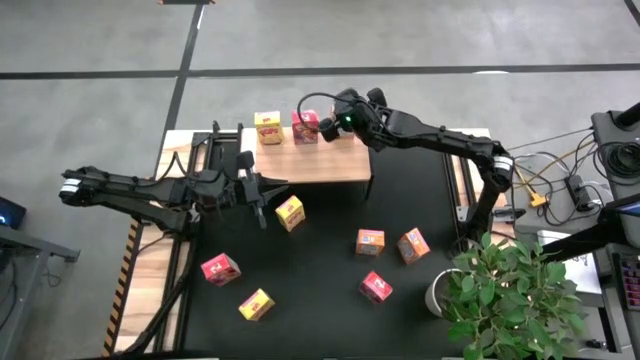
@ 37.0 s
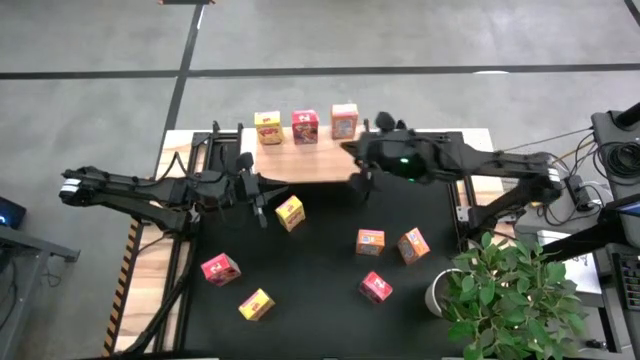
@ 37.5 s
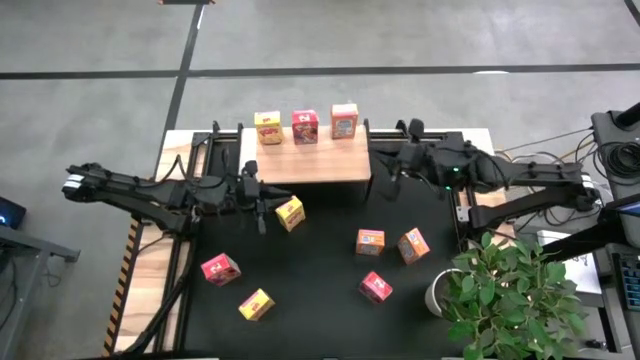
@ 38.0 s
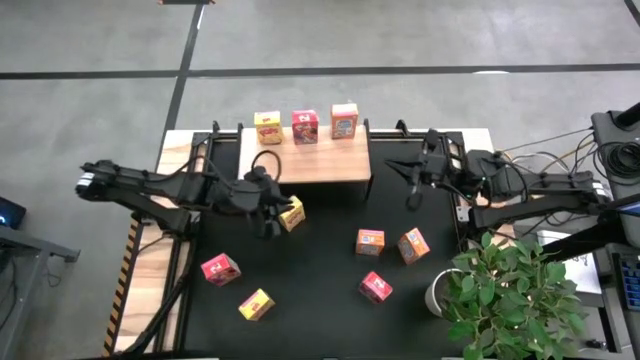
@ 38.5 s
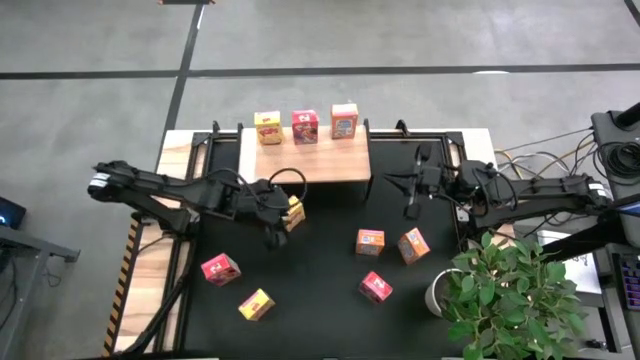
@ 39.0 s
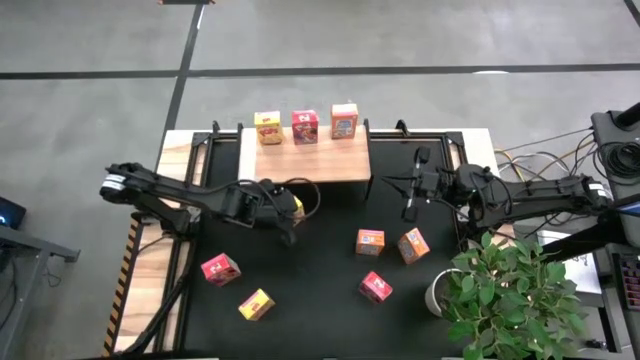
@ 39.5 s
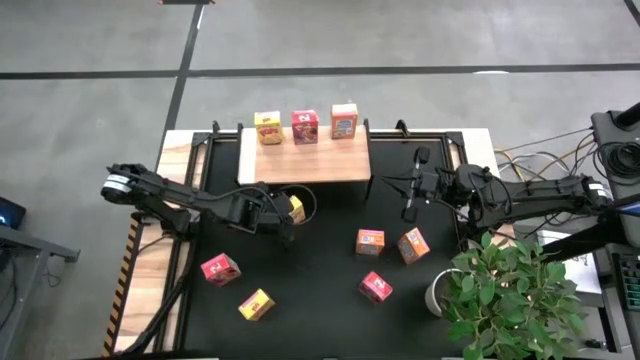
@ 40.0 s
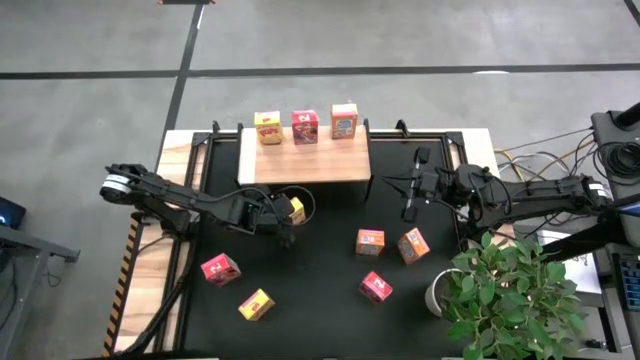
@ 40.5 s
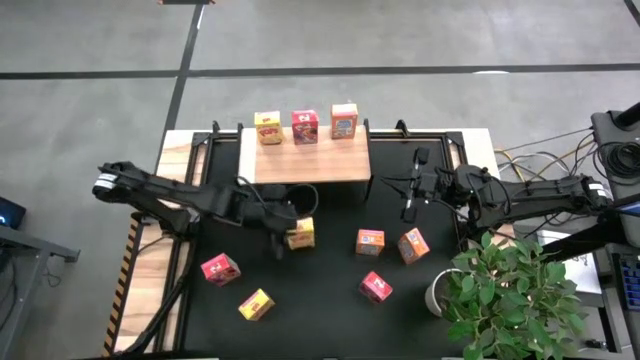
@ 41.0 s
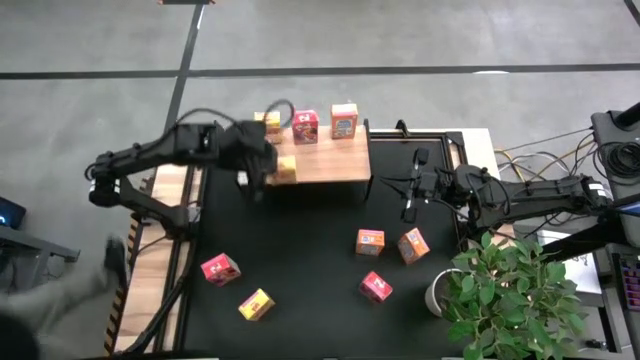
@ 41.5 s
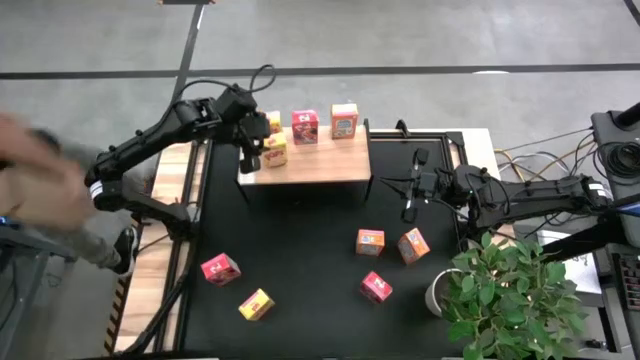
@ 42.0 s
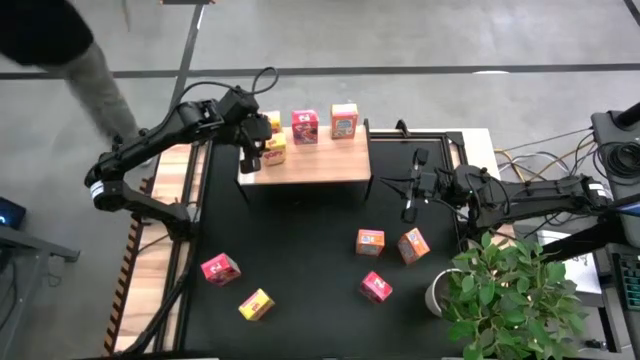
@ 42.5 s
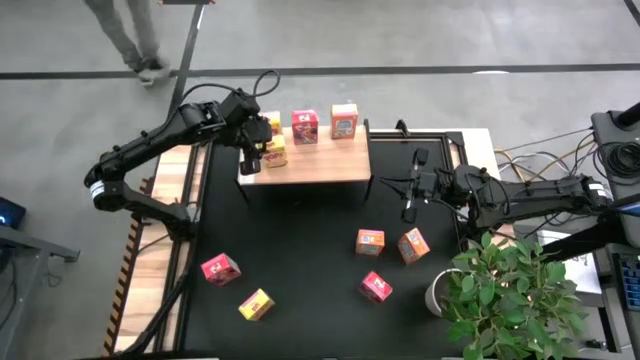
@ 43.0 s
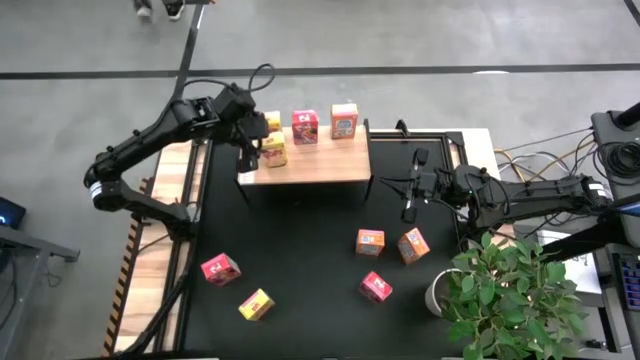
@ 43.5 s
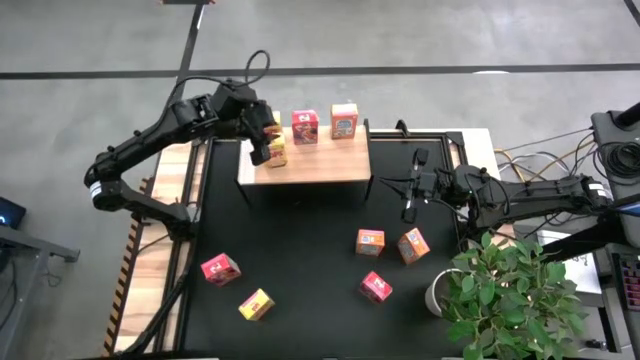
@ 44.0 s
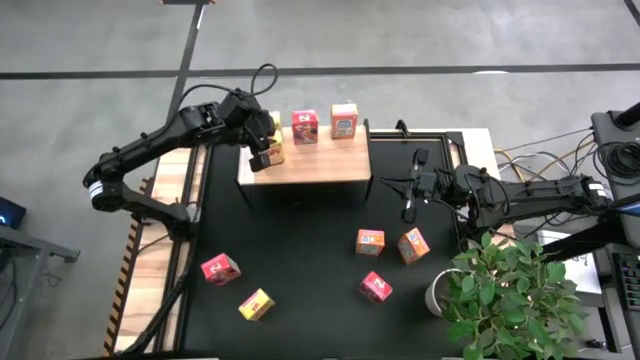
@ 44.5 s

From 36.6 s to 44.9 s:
Task: Stack cereal on shelf
Put the top yellow cereal box aligned with the other yellow cereal box on the shelf

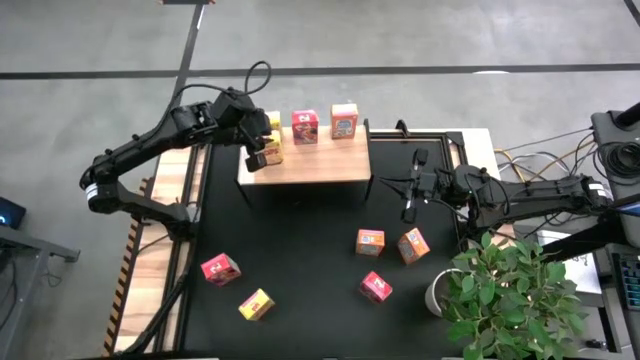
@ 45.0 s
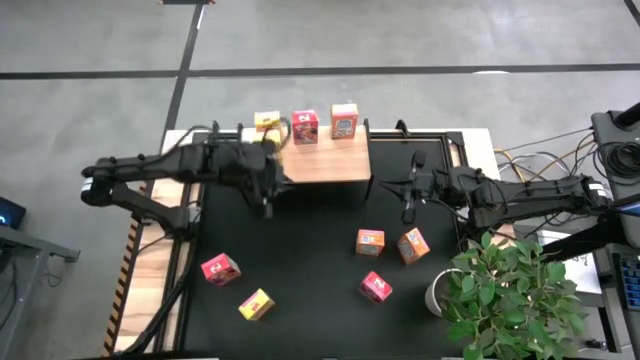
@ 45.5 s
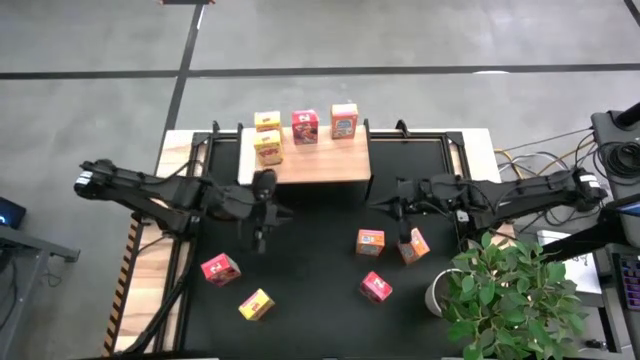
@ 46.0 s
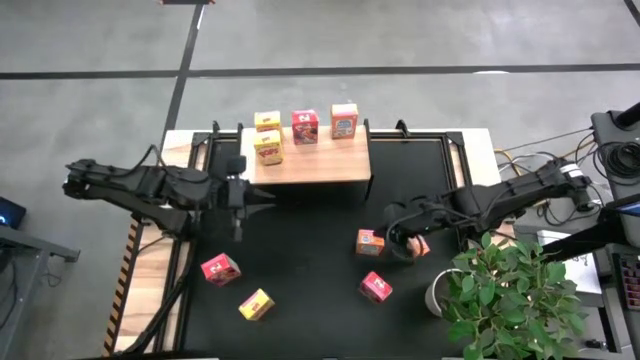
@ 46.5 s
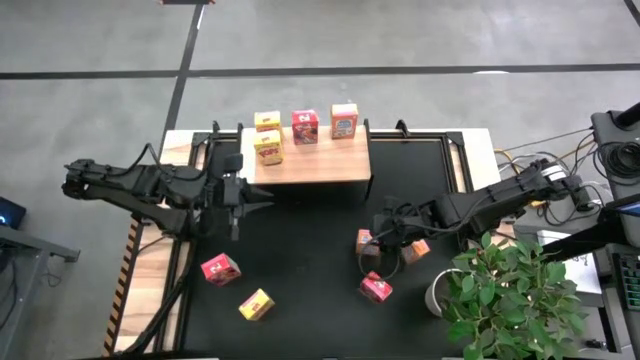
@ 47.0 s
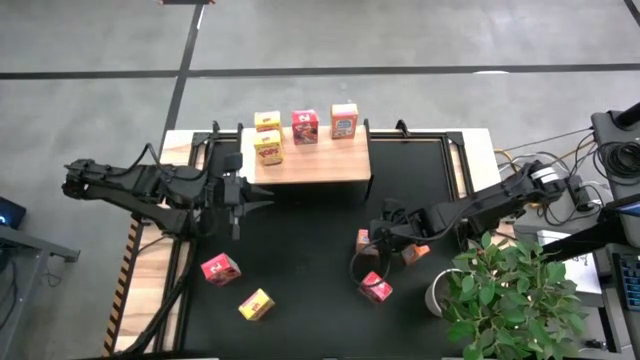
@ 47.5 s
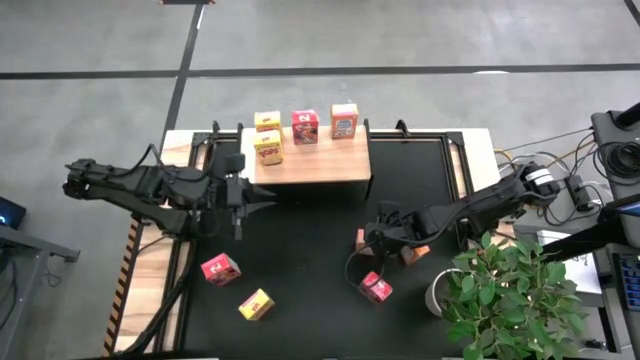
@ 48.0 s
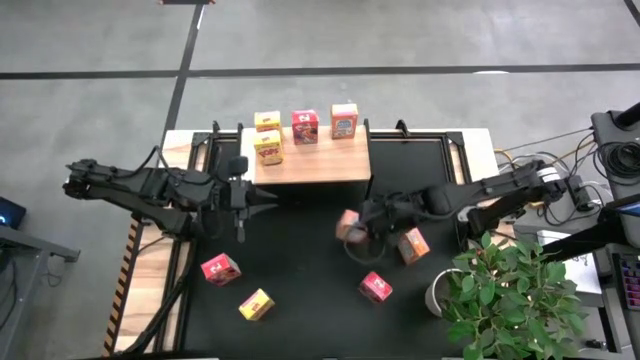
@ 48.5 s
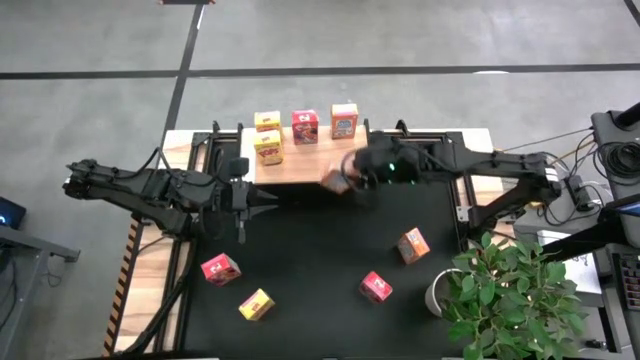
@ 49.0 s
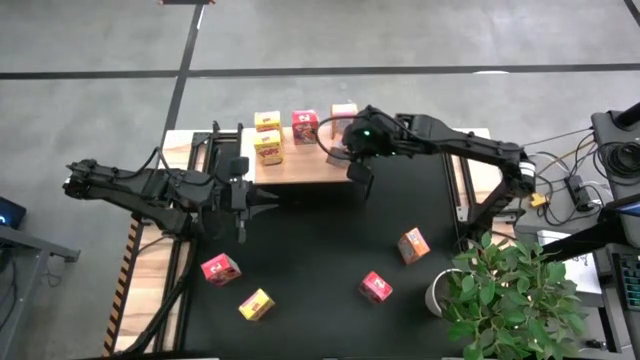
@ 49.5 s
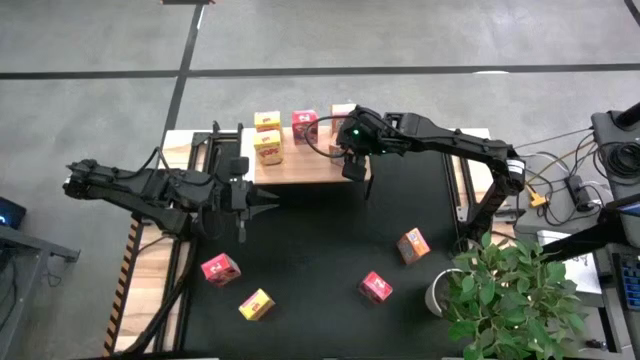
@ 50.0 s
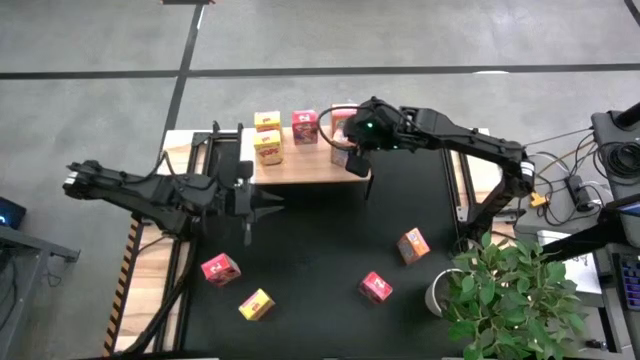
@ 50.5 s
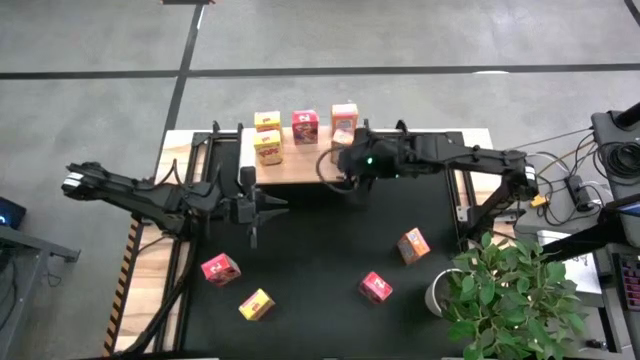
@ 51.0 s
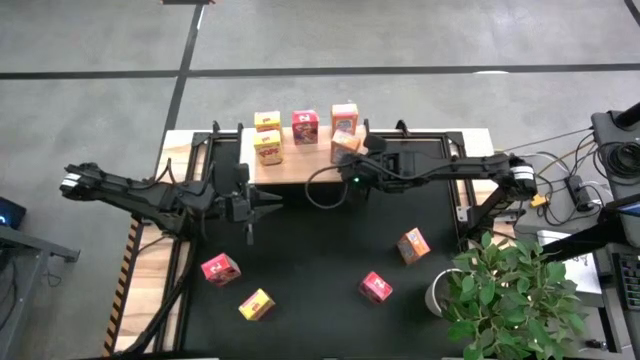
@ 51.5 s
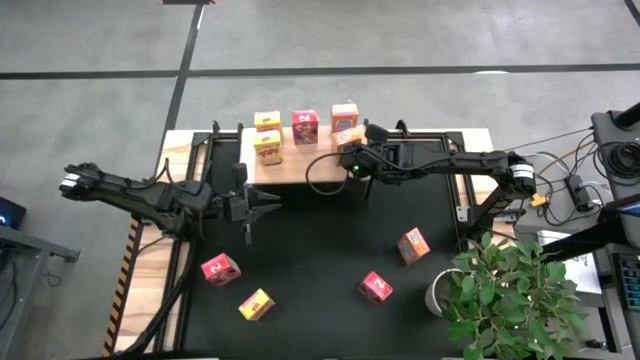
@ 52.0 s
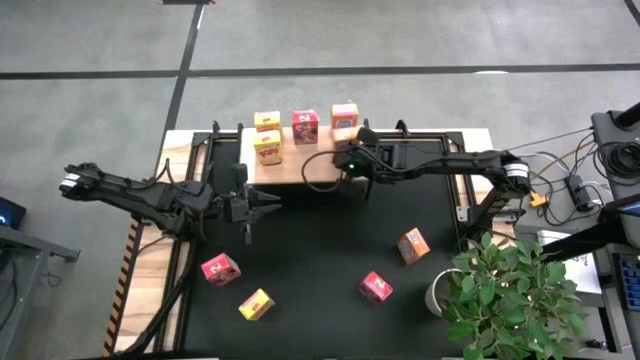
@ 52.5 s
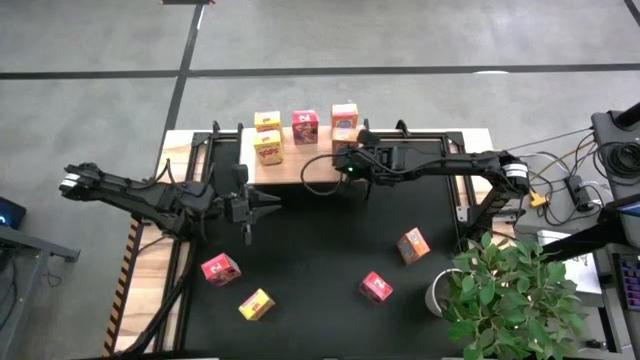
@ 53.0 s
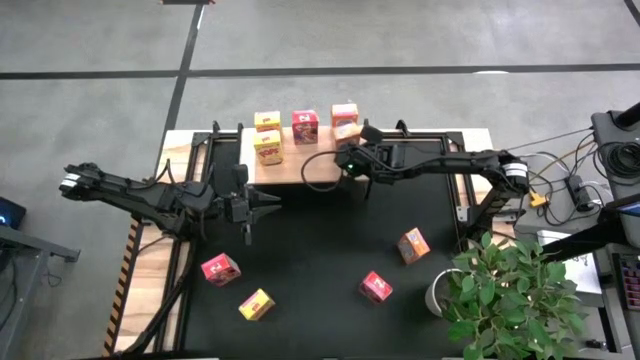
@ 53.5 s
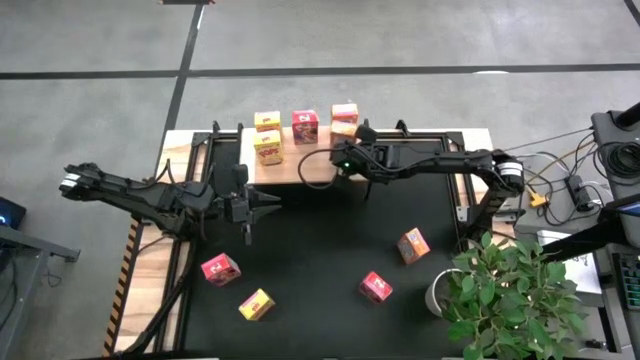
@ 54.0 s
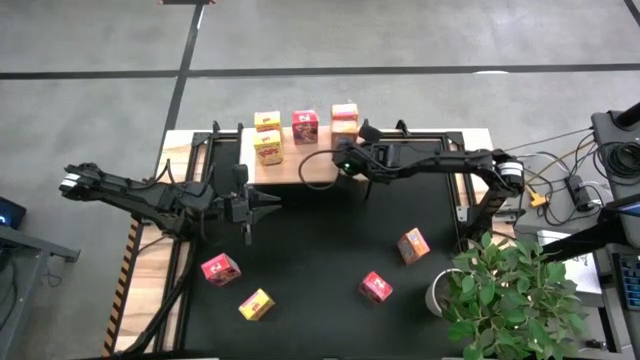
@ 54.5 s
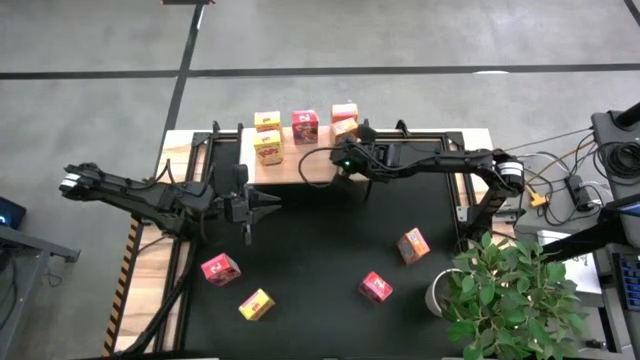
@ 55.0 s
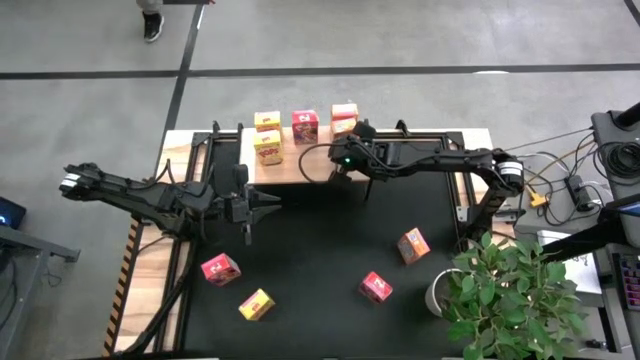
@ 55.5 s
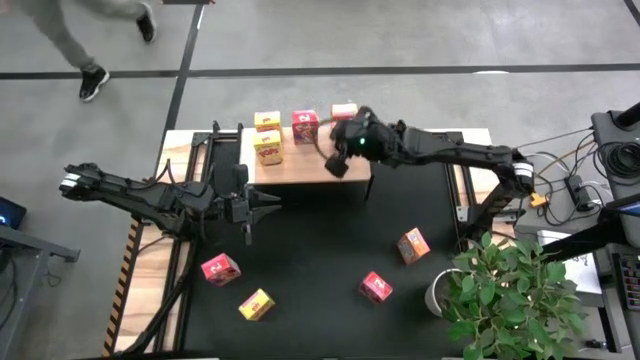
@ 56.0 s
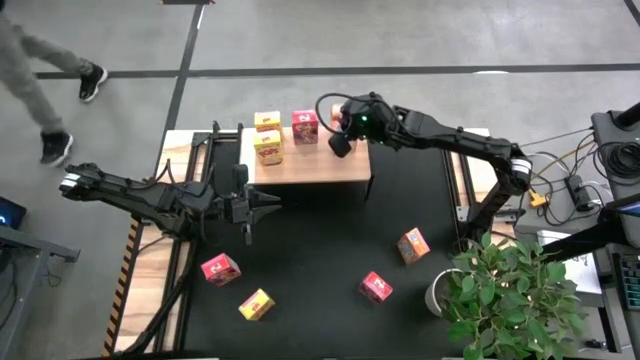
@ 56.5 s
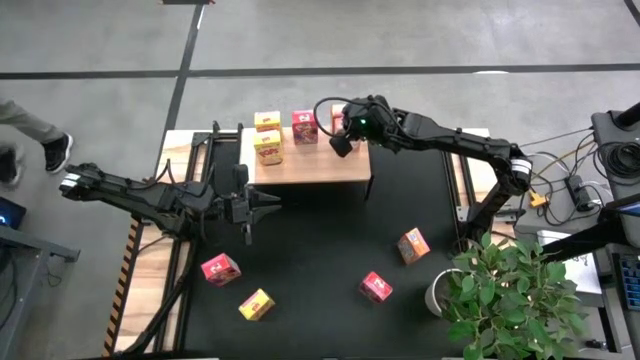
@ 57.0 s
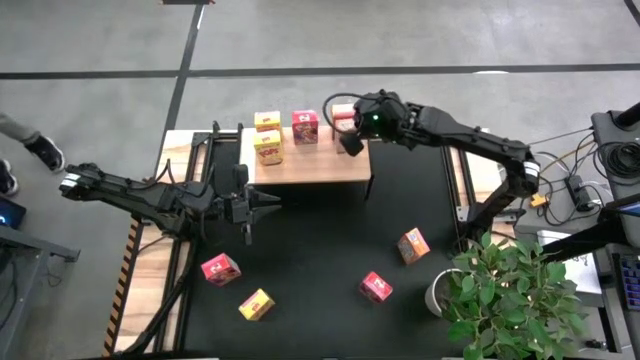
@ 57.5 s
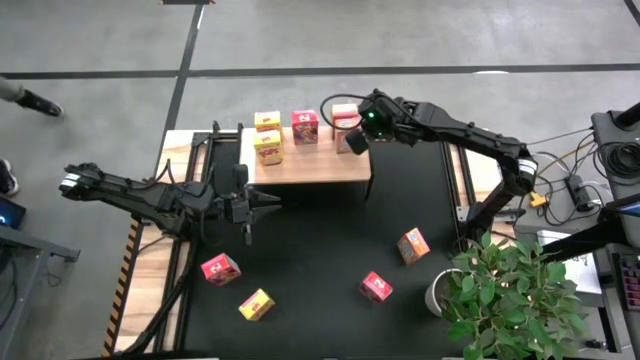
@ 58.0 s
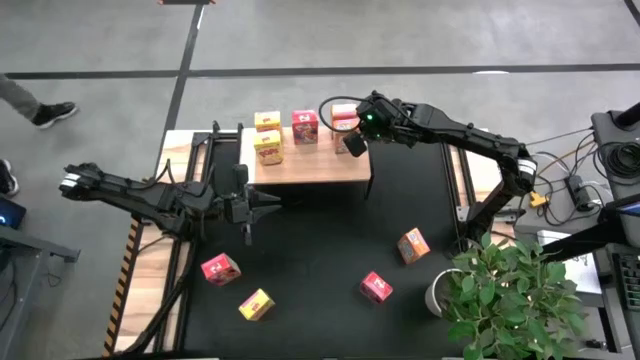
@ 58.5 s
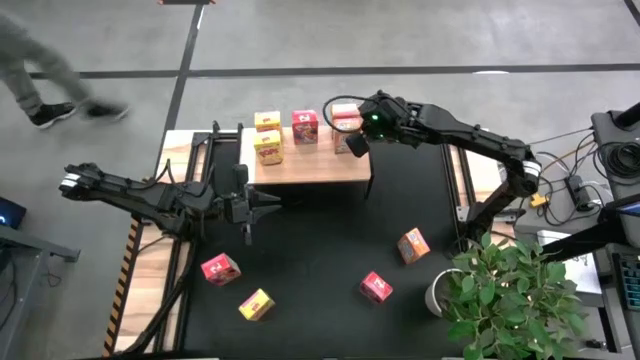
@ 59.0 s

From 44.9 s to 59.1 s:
Put the left orange cereal box aligned with the other orange cereal box on the shelf
